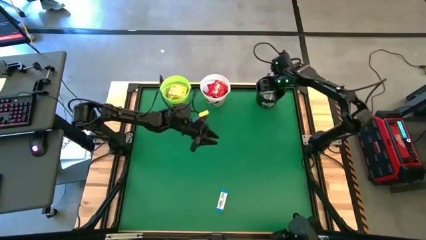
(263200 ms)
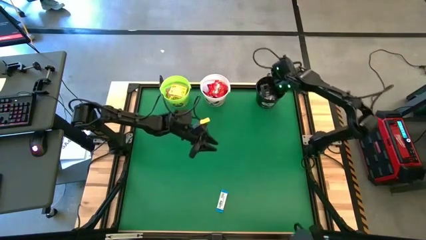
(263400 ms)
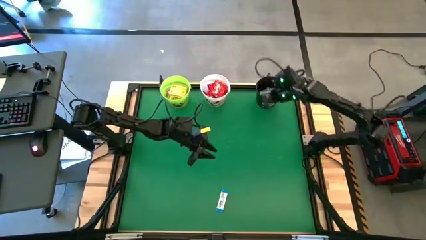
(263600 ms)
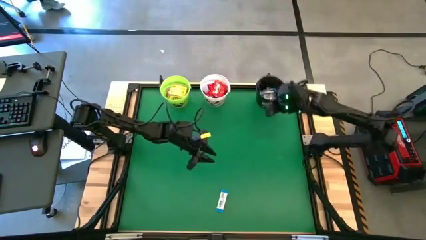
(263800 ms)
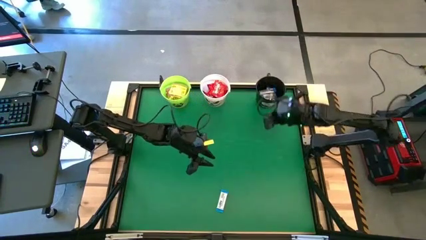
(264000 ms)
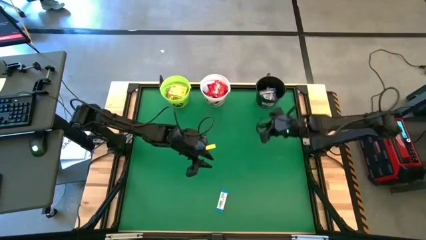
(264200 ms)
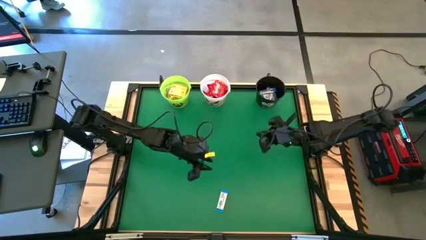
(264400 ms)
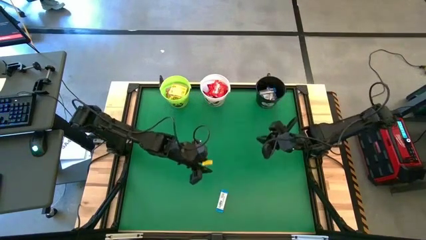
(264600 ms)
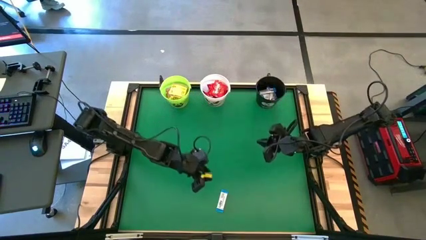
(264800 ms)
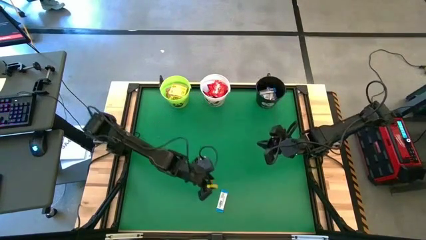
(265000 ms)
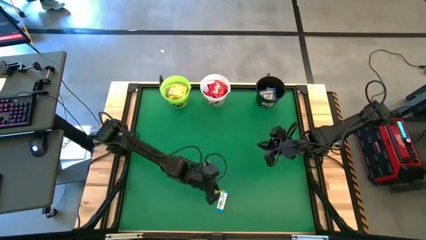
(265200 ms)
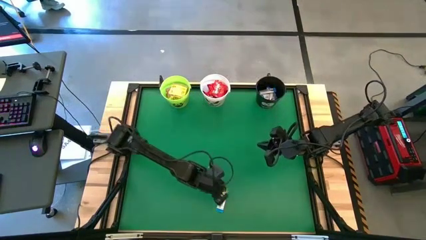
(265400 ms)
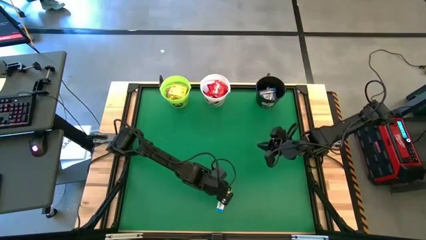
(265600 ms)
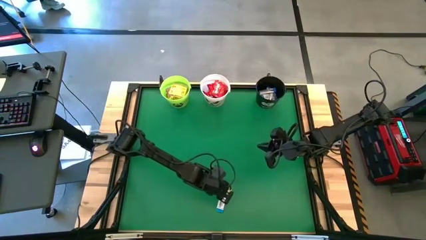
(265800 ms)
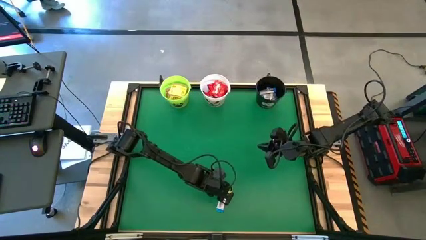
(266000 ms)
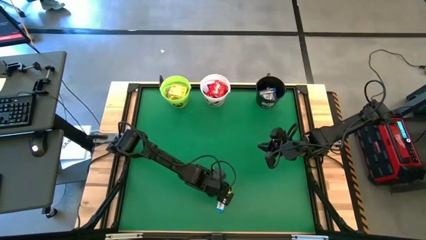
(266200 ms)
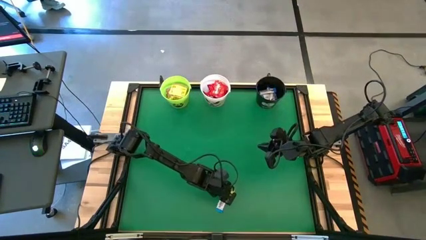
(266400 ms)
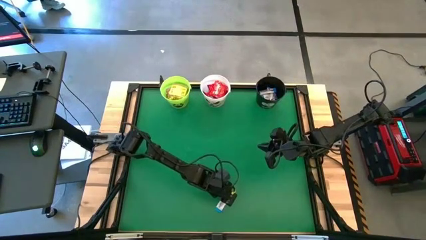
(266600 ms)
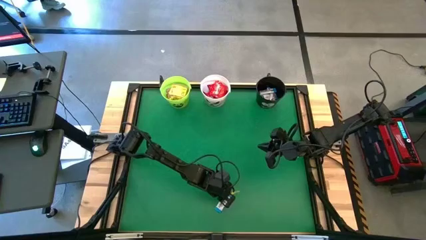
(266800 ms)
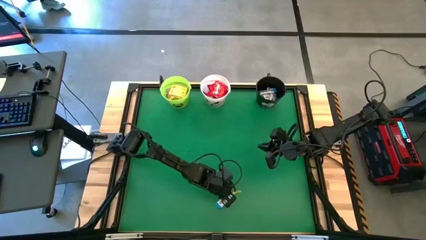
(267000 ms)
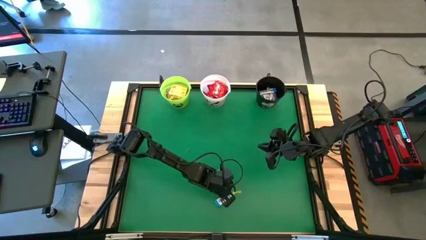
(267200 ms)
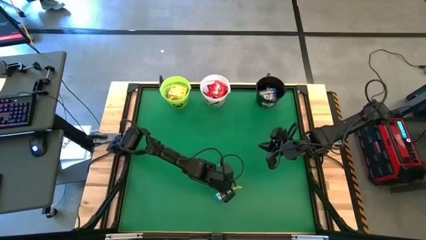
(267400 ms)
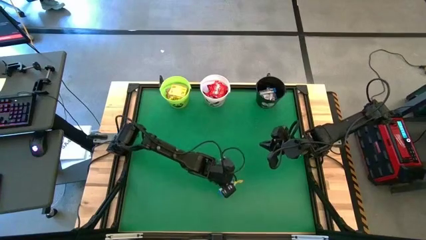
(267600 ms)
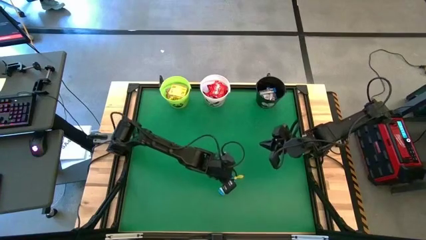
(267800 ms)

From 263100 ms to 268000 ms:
Task: Sort candy by brand, put in halloween buckets
Put the white chocolate bar into the black bucket

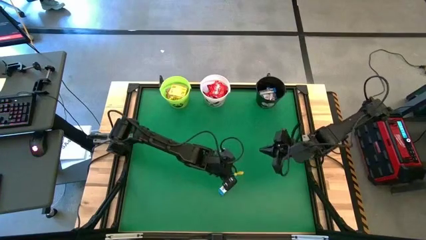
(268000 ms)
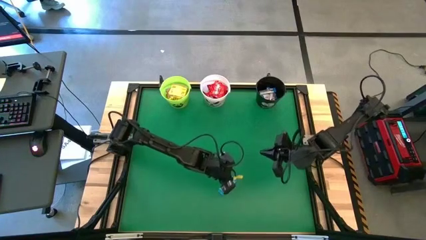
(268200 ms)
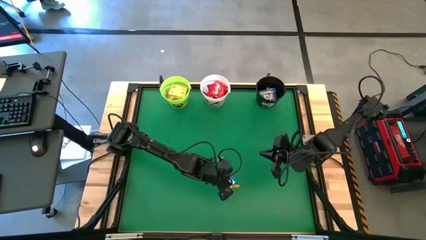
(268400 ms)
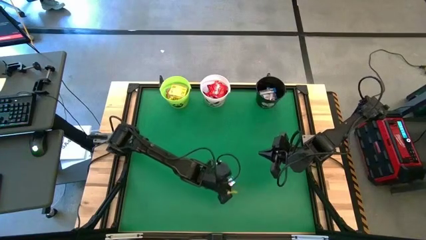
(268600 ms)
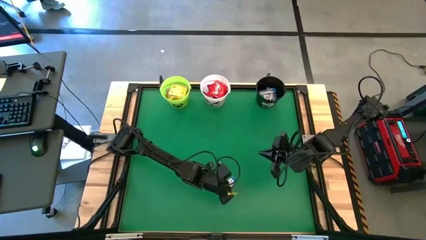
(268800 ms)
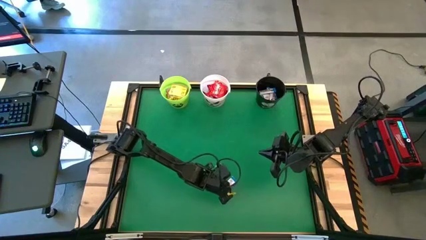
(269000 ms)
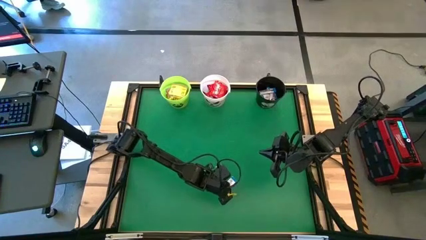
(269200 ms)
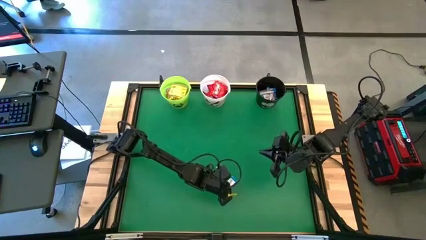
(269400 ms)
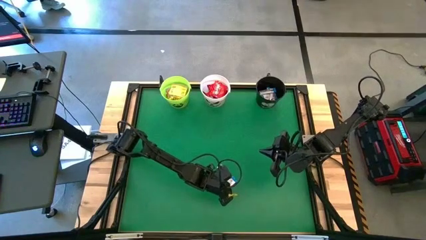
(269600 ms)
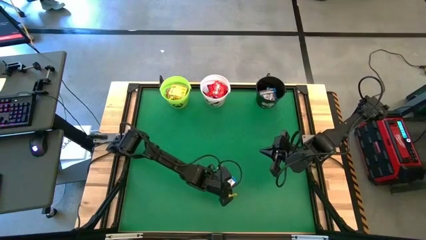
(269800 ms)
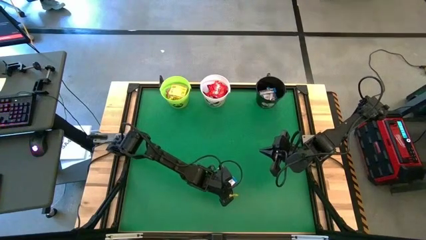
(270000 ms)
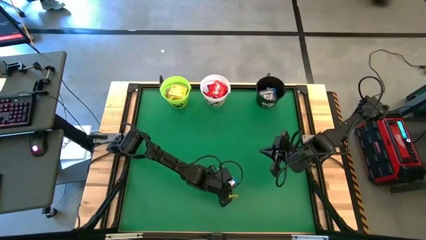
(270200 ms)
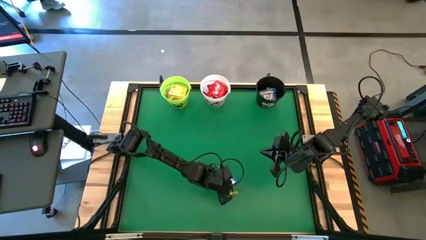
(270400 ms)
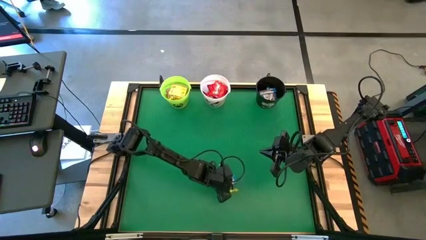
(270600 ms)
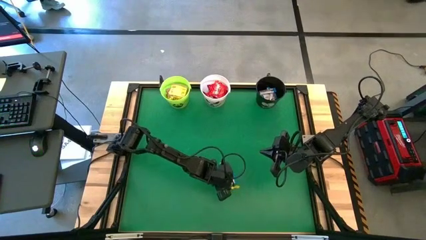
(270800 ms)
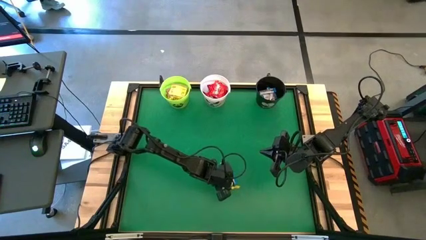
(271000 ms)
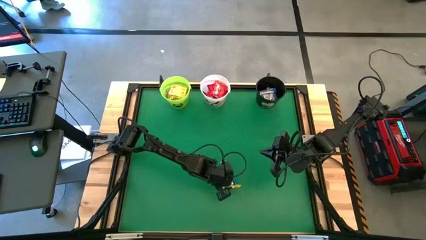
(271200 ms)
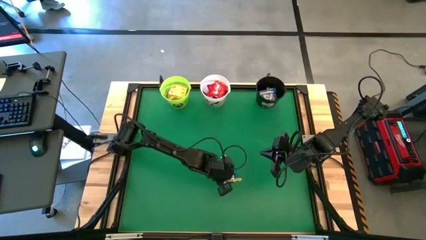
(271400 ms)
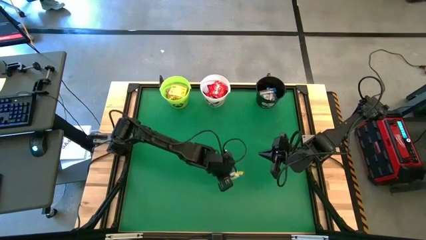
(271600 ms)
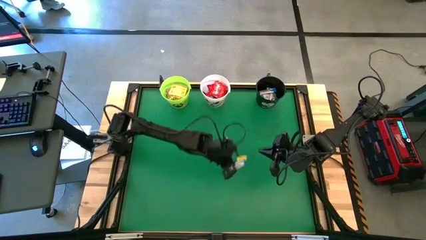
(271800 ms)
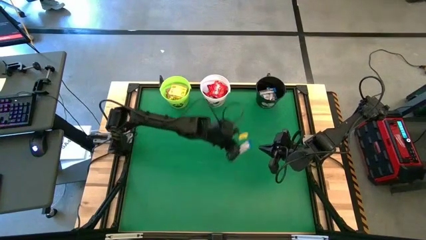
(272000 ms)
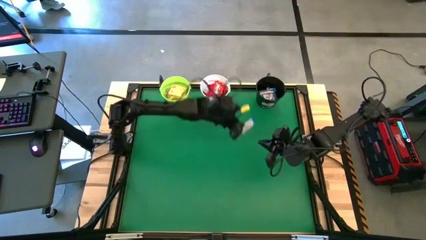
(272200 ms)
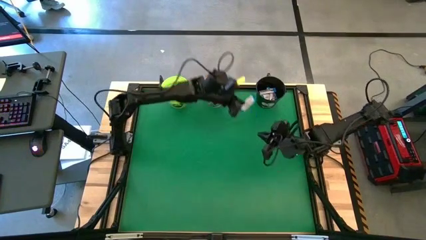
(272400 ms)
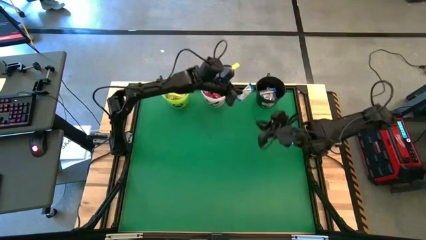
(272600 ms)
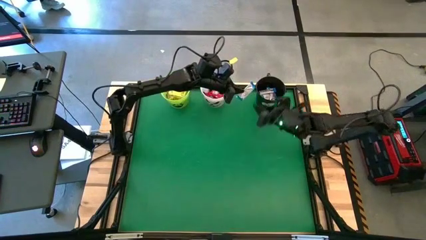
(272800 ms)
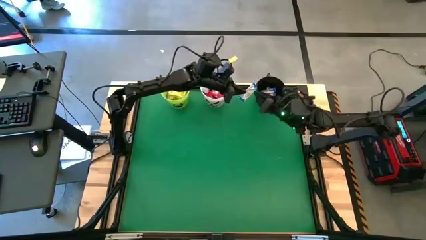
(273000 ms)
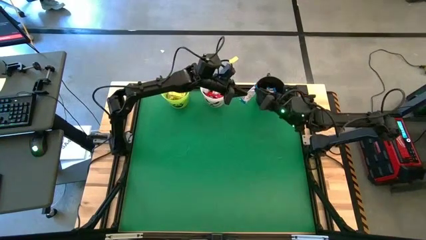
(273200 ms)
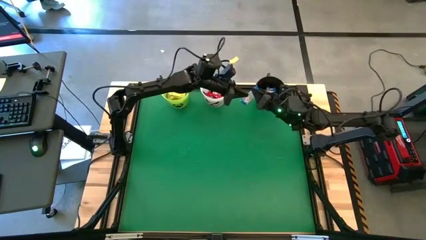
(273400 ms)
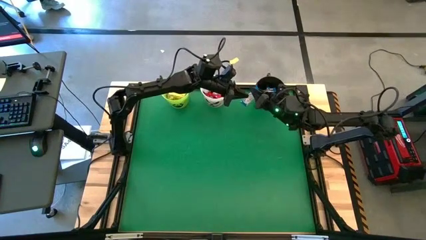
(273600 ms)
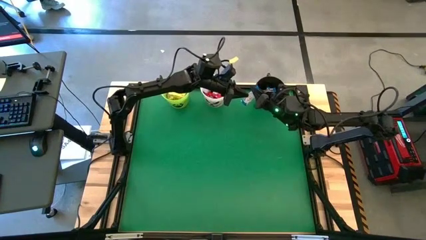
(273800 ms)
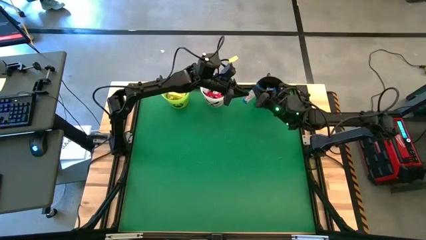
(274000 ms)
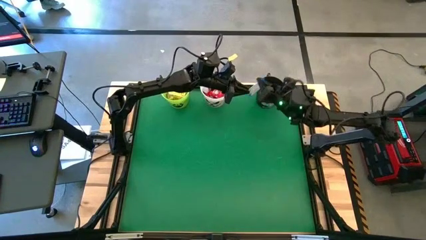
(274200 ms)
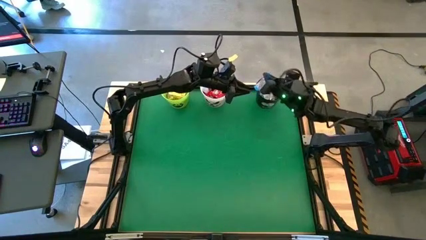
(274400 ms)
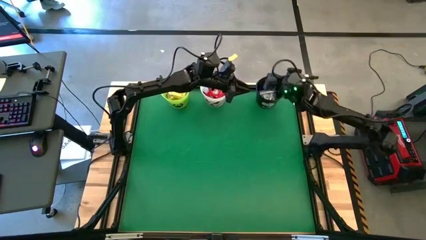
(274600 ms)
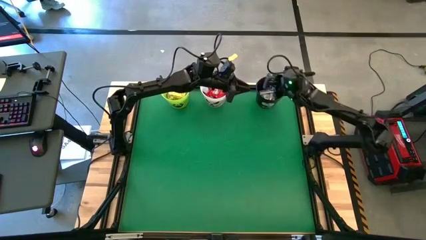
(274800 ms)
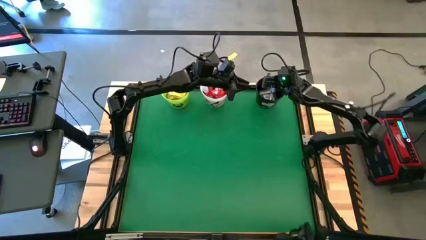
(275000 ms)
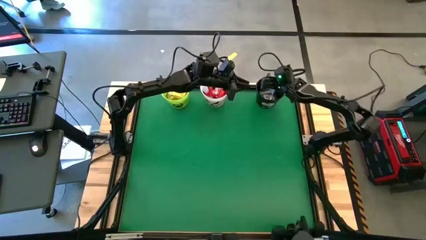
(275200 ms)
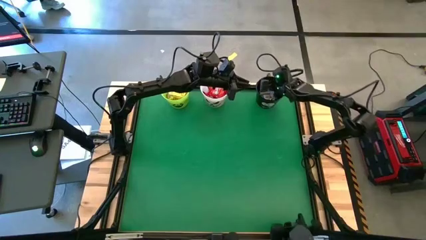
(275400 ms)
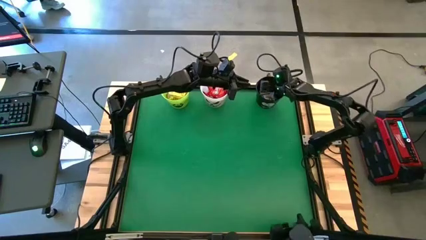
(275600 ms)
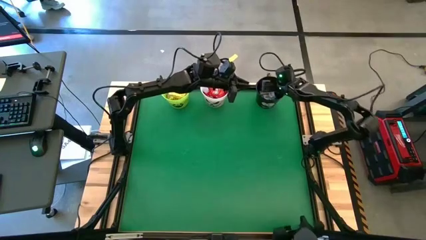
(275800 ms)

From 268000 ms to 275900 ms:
Put the white chocolate bar into the black bucket

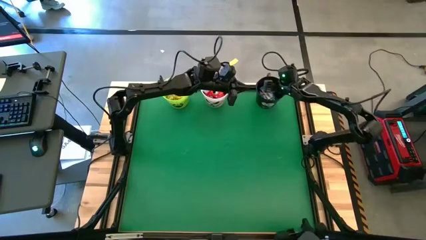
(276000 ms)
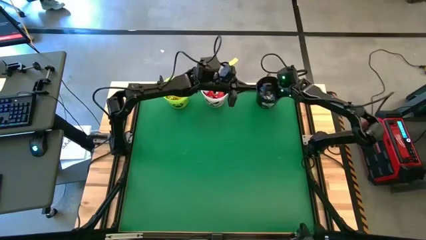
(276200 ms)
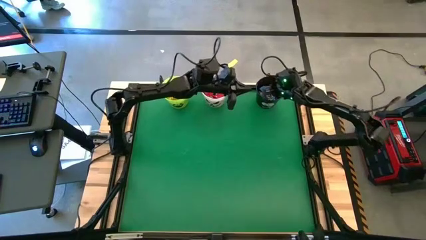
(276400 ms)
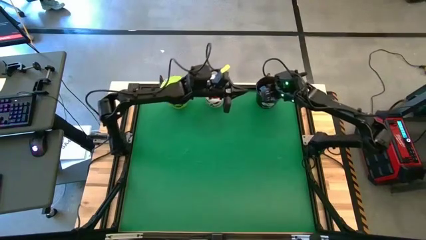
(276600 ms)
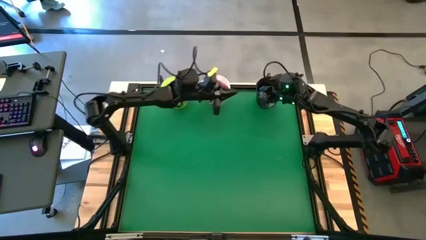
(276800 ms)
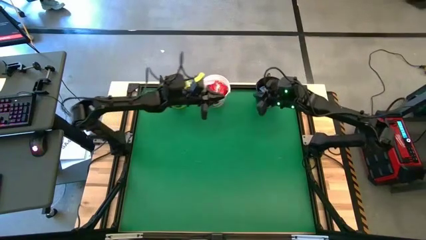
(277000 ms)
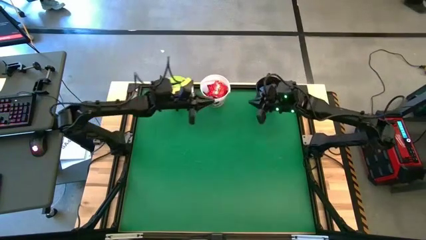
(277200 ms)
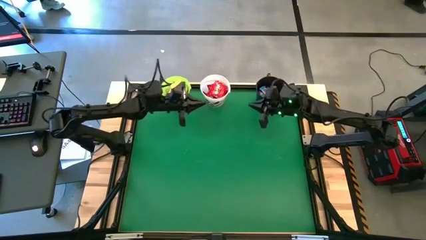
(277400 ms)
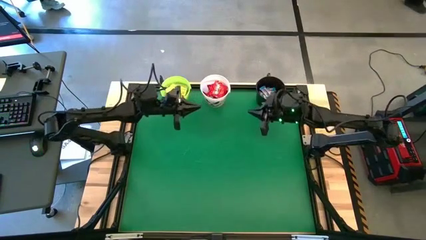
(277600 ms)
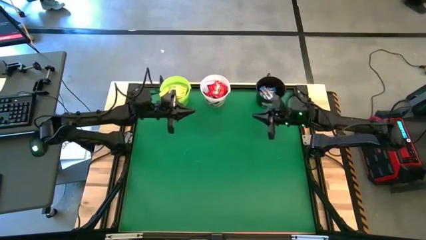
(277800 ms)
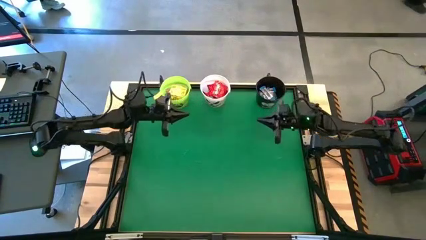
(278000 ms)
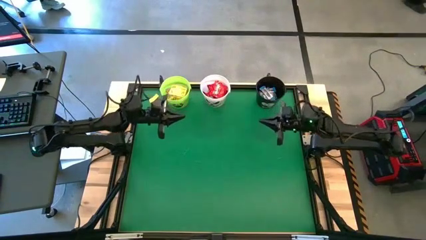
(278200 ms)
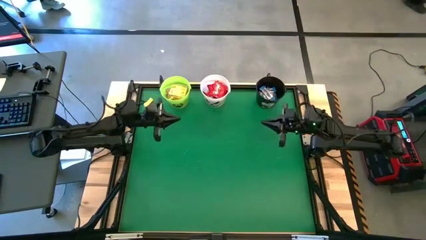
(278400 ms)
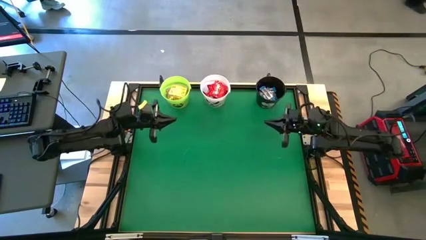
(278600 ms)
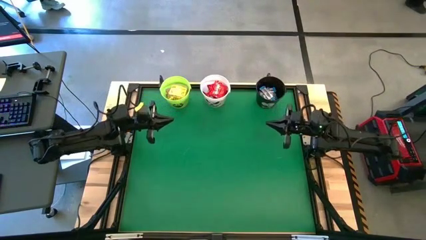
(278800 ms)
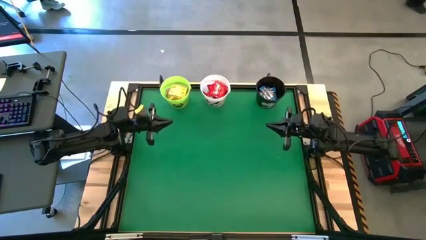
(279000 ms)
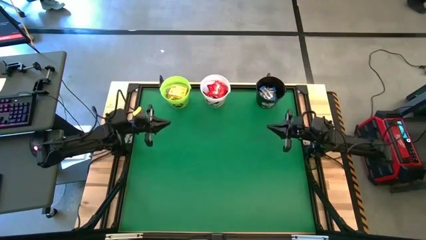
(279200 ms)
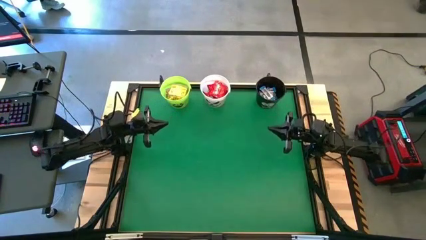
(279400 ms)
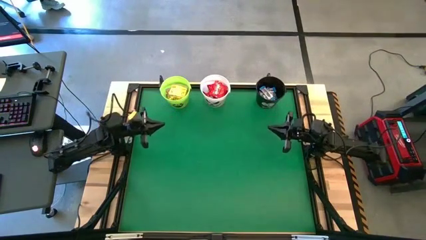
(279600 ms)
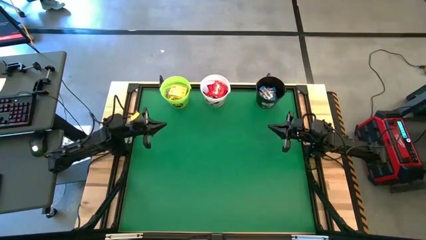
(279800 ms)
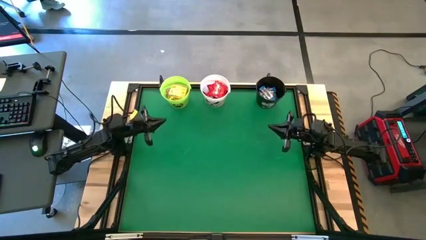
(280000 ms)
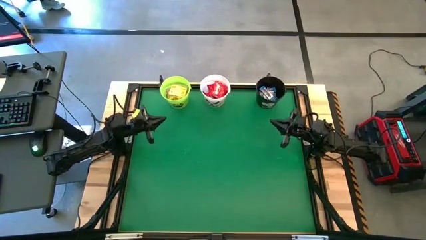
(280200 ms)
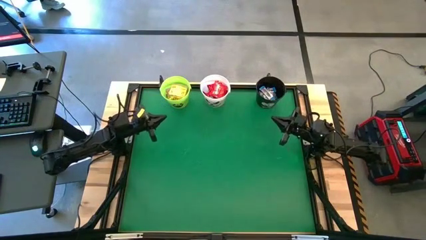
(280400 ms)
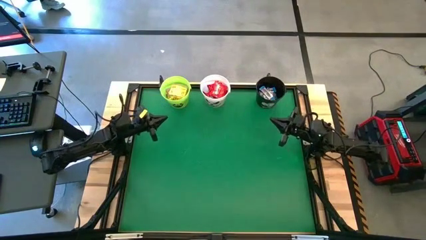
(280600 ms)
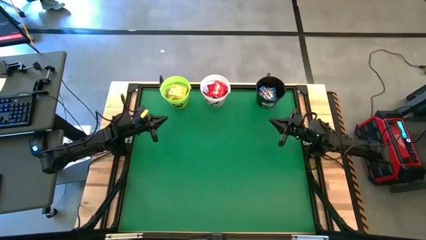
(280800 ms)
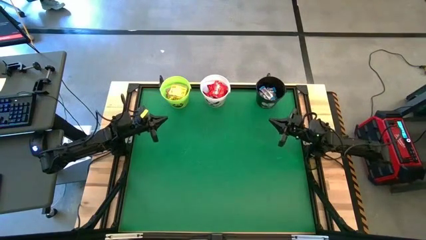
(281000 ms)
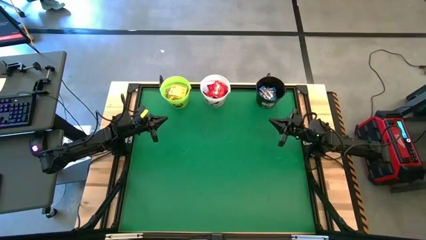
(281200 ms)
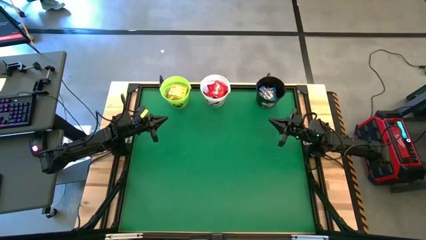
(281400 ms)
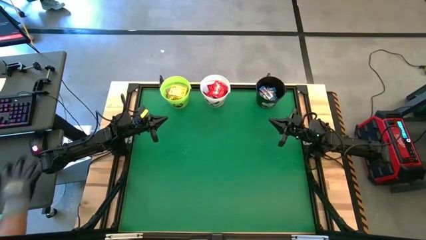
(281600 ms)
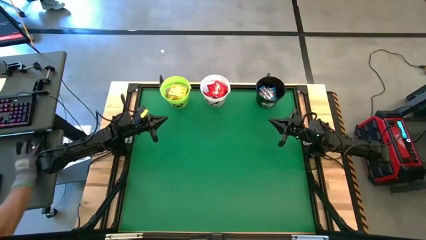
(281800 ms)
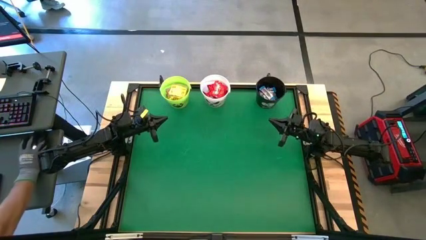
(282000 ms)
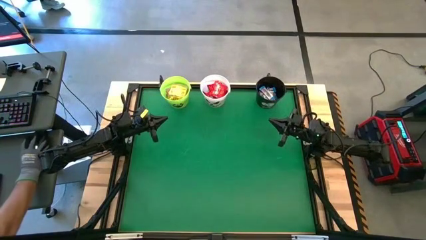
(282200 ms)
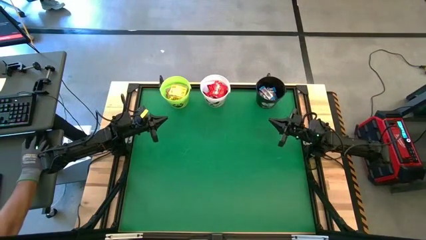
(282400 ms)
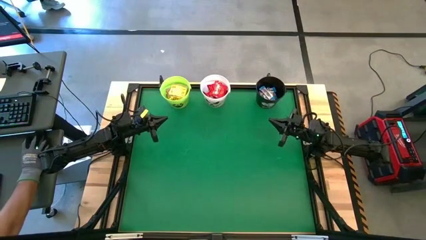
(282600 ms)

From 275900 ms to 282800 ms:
Return to Home Position
